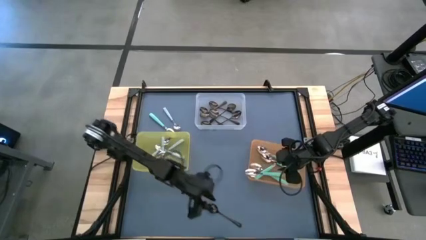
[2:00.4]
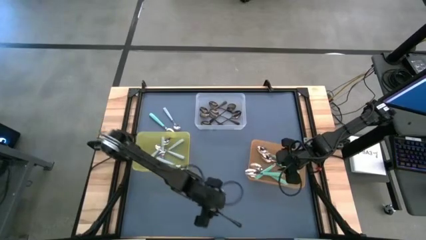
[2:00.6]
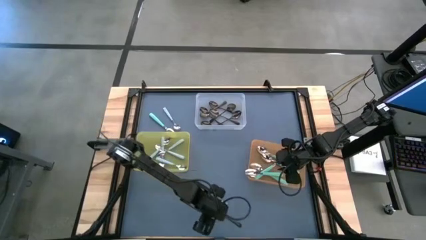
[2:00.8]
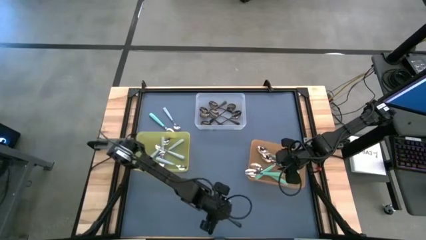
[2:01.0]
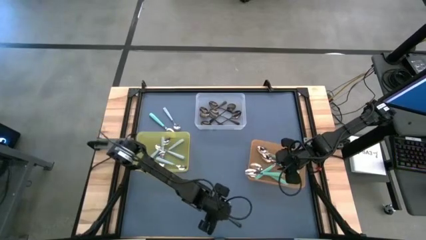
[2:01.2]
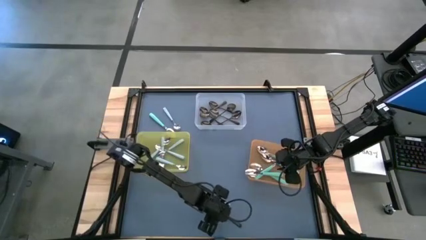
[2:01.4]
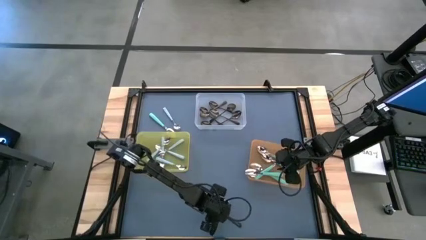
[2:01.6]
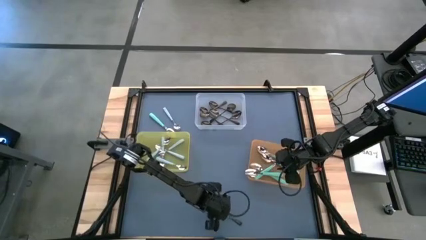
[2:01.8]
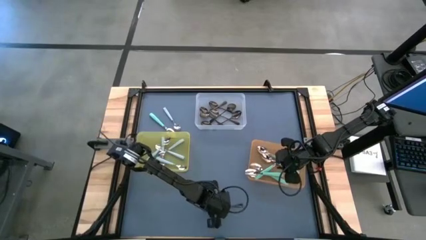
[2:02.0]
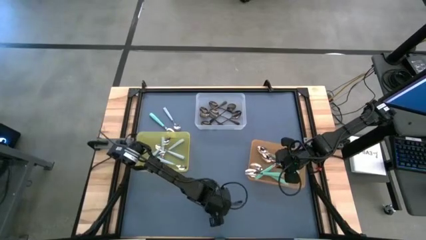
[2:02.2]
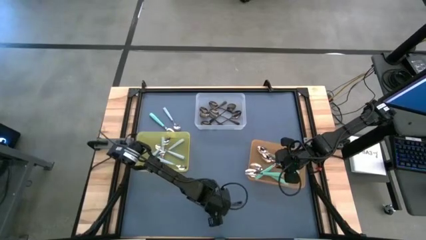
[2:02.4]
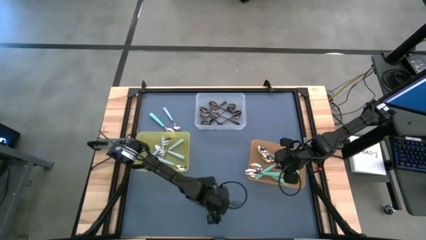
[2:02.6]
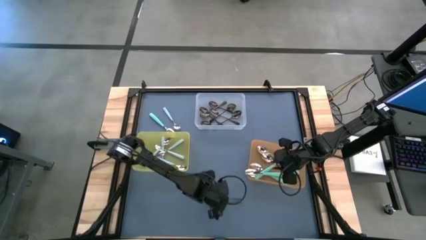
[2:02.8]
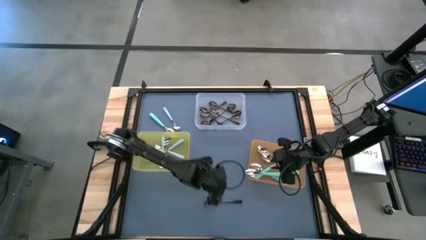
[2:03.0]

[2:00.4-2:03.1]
Task: Sort silverware by color (type)
Put the black spoon into the transparent bin

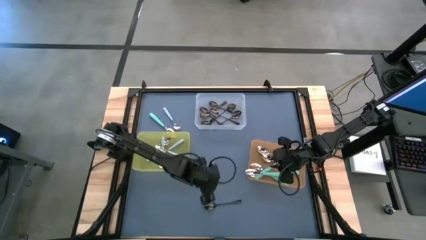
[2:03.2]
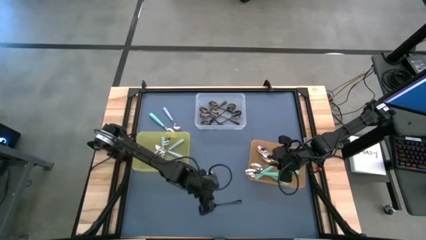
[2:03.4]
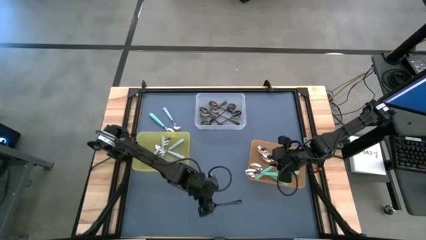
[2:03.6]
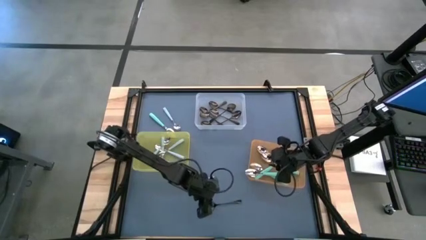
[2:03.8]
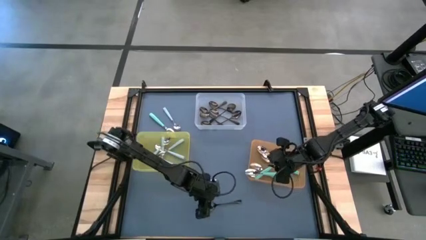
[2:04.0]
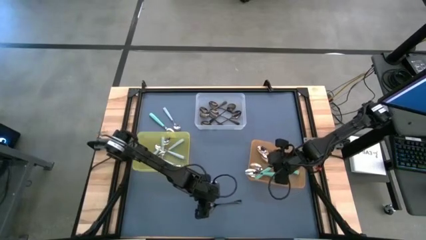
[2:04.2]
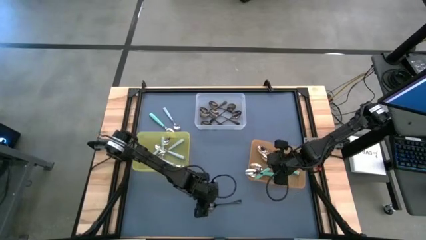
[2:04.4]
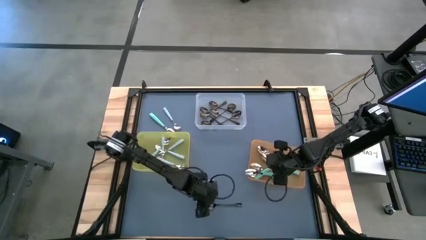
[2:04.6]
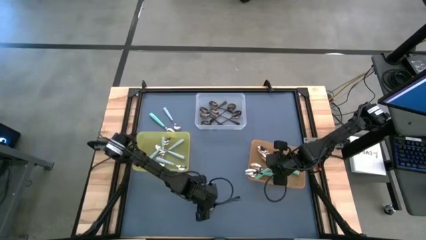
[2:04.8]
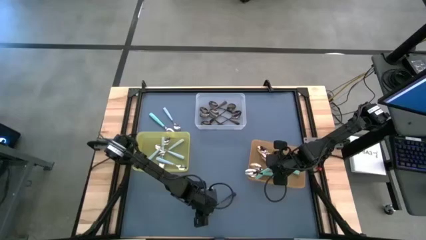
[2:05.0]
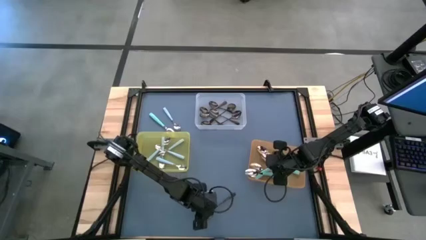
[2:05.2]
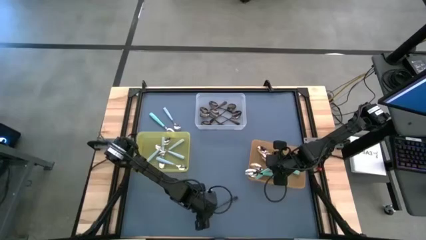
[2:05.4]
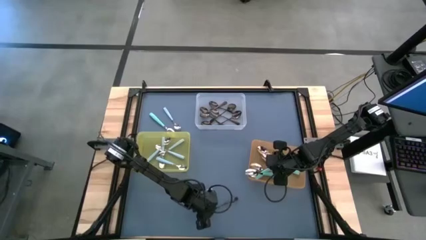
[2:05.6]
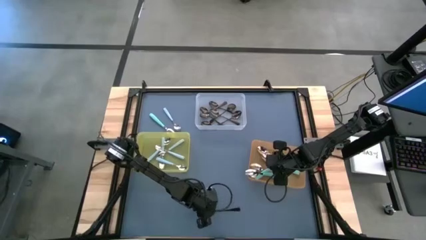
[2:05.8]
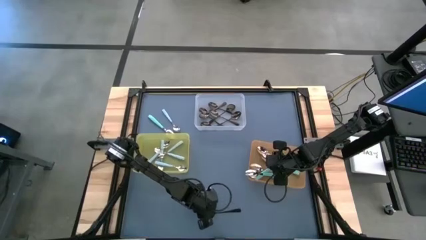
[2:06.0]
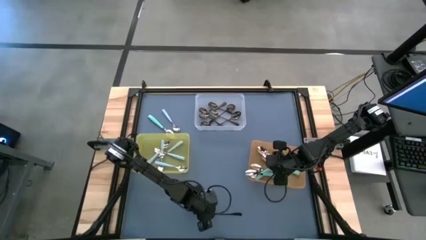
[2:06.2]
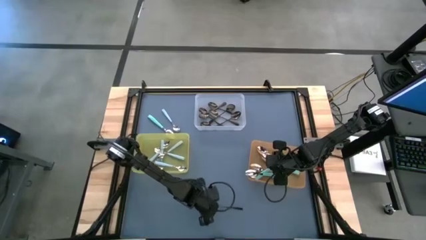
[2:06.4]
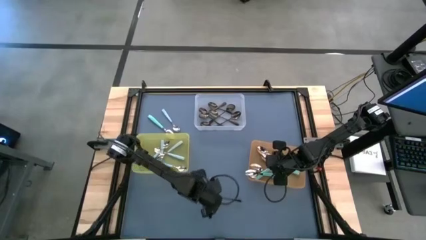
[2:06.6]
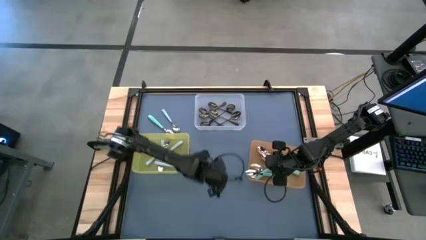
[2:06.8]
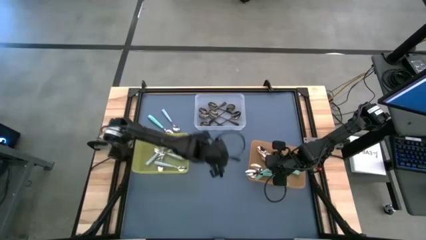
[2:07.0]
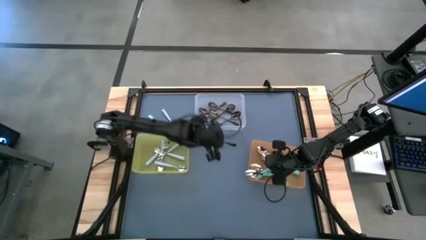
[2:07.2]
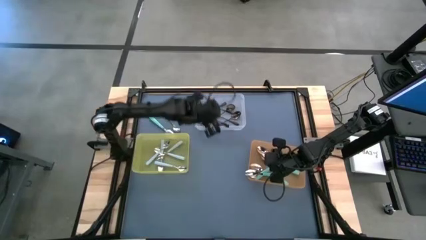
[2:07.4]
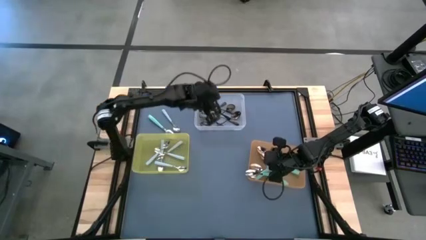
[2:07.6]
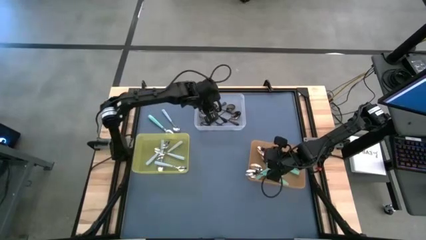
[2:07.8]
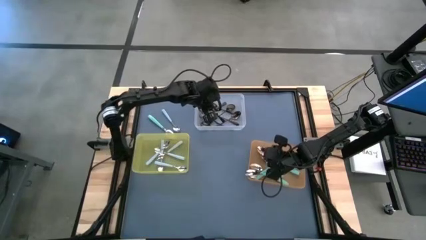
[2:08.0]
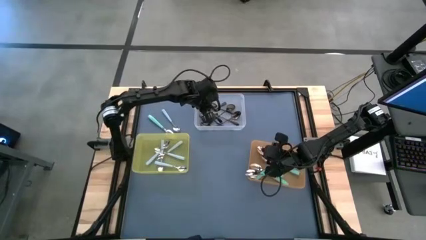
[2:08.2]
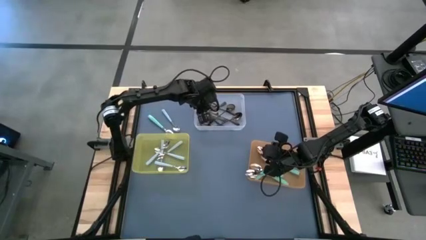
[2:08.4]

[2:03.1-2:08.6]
Put the black spoon into the transparent bin

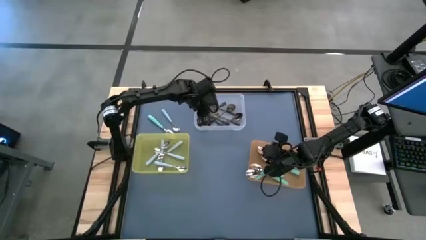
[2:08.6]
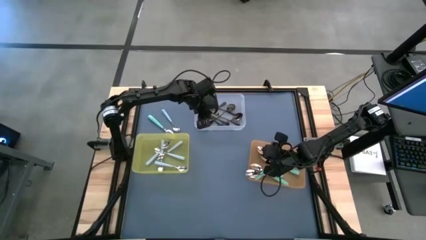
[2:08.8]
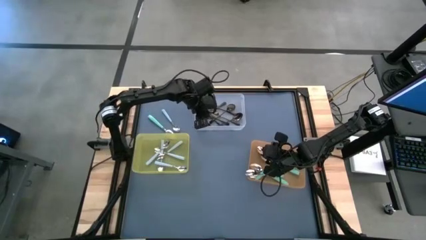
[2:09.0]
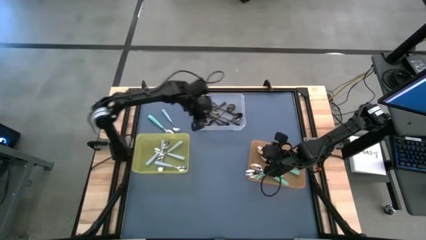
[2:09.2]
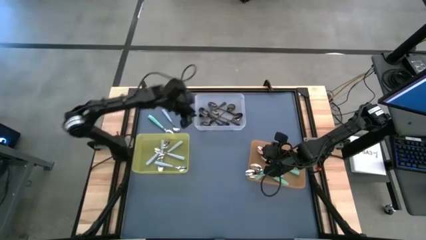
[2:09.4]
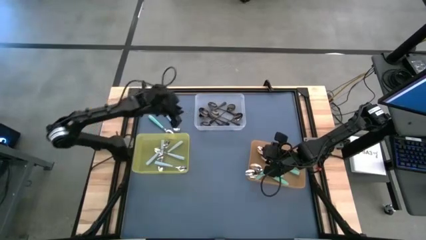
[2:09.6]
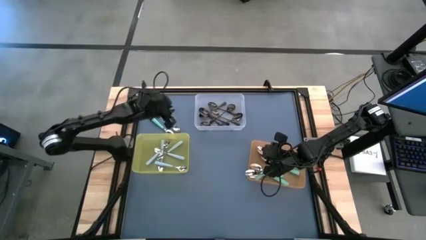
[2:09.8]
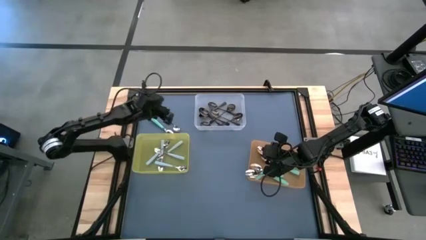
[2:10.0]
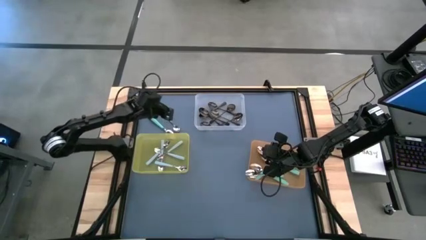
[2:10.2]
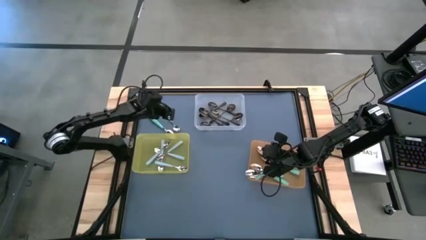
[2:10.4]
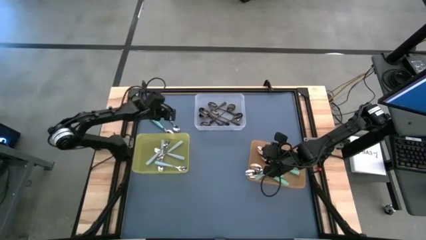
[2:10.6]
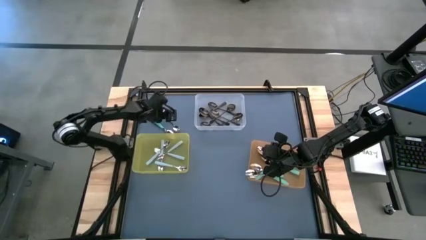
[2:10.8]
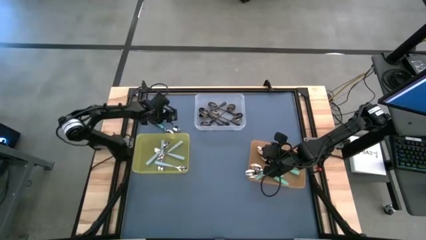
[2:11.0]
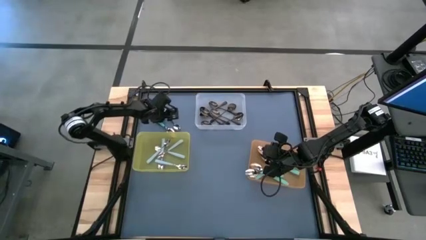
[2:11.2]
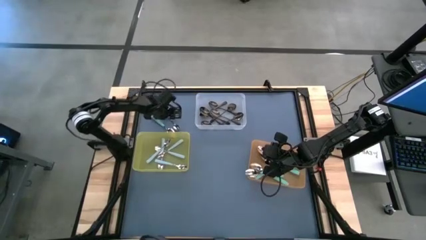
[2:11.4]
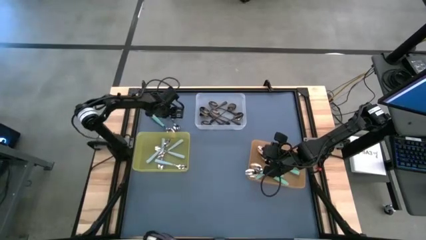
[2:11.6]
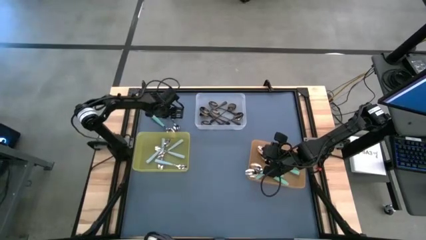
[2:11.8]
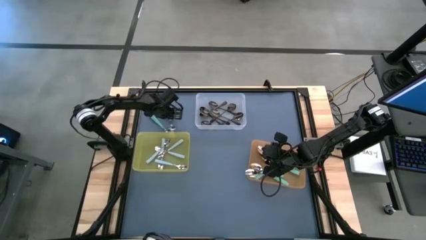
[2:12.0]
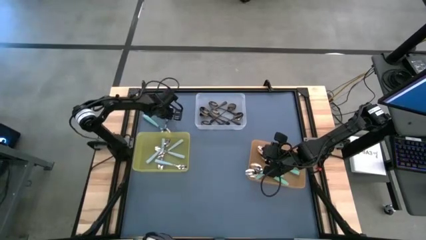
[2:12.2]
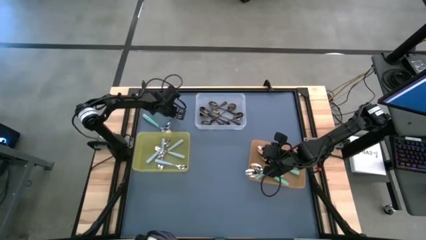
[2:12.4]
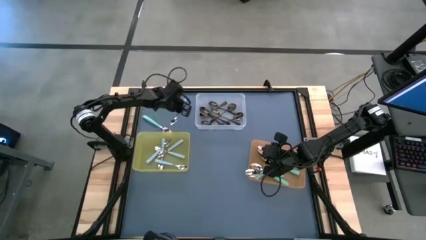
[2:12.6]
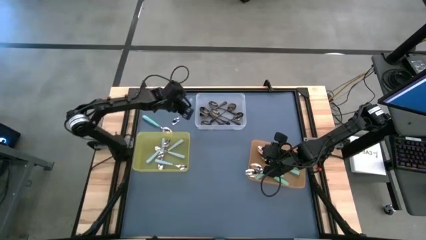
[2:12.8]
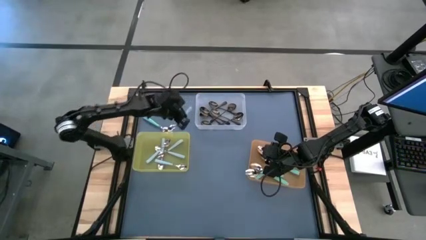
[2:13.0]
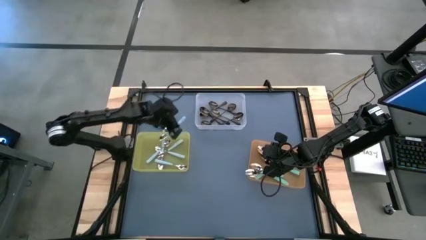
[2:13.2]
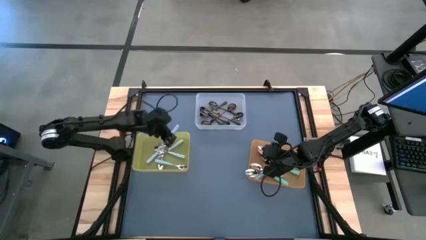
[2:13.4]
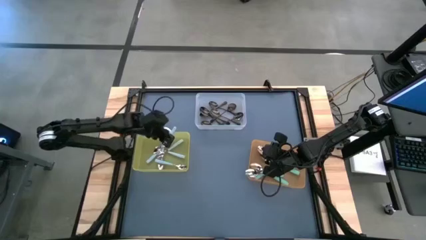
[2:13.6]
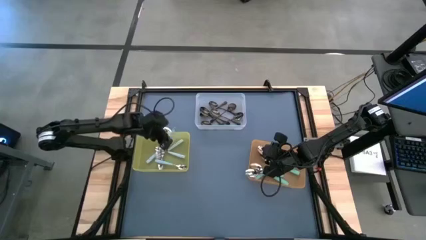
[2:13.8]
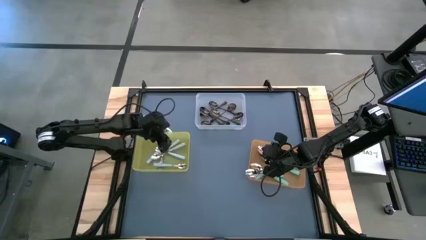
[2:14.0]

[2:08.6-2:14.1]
Put the blue spoon into the yellow bin
